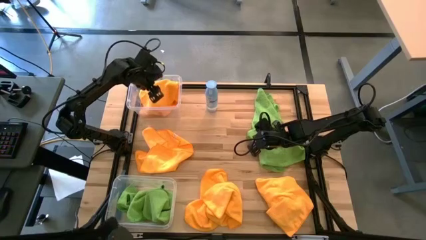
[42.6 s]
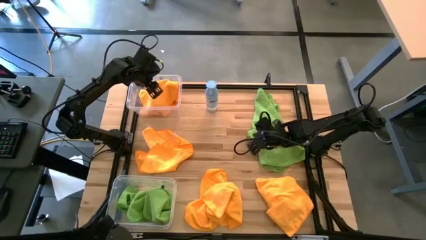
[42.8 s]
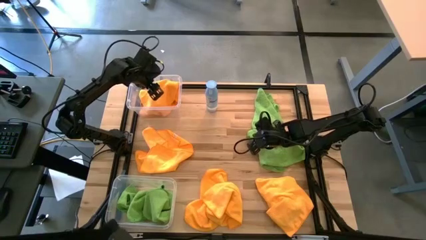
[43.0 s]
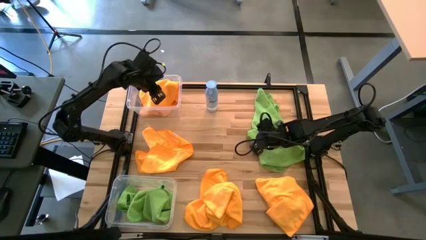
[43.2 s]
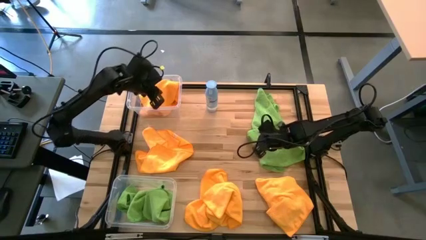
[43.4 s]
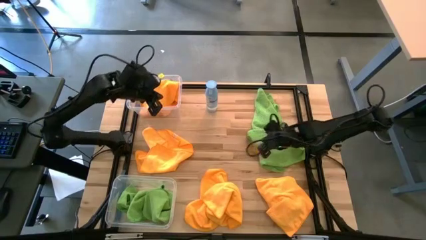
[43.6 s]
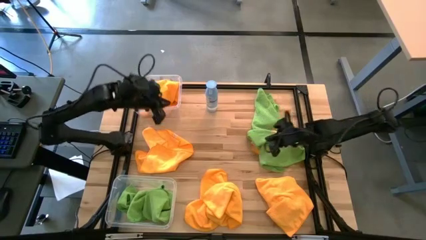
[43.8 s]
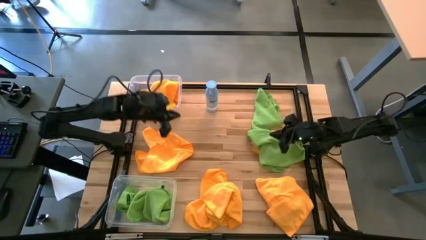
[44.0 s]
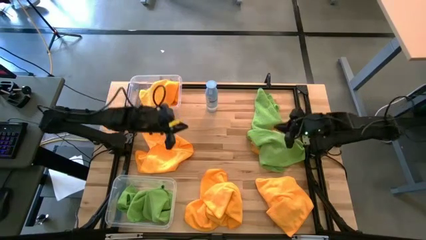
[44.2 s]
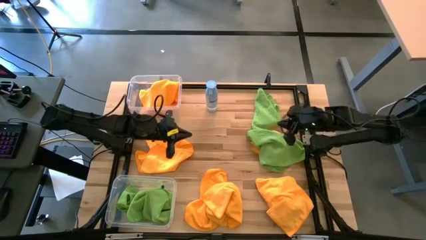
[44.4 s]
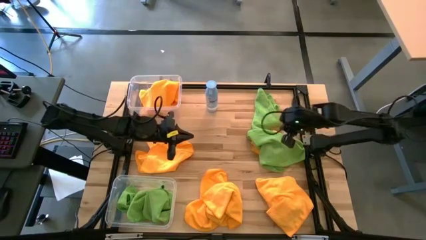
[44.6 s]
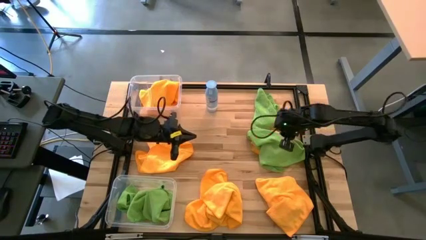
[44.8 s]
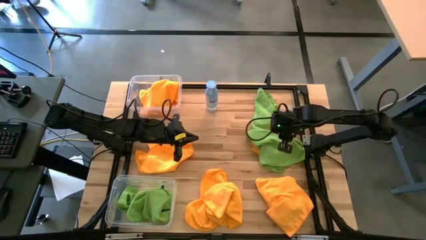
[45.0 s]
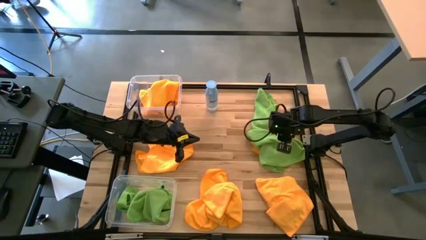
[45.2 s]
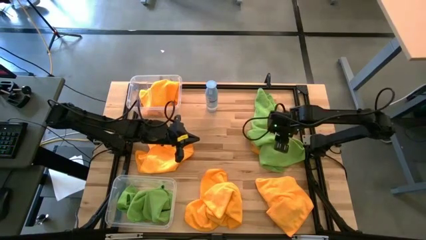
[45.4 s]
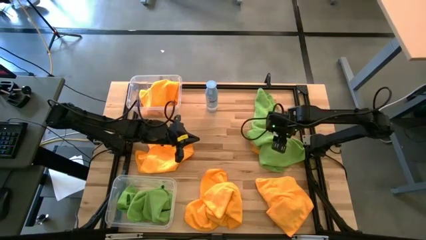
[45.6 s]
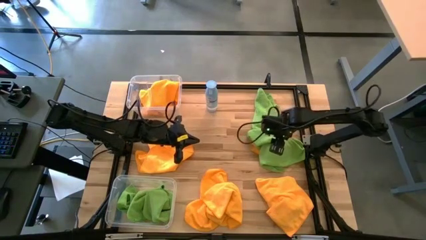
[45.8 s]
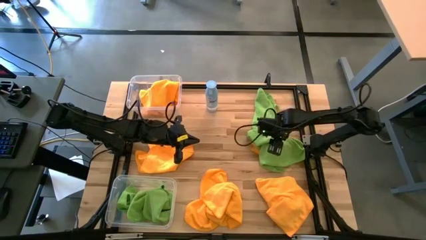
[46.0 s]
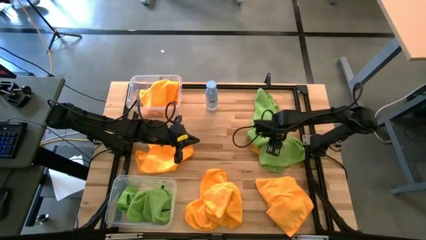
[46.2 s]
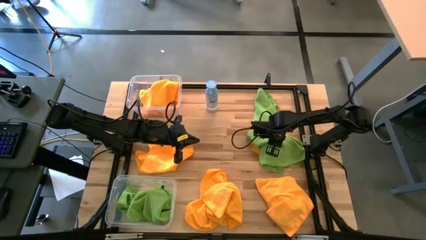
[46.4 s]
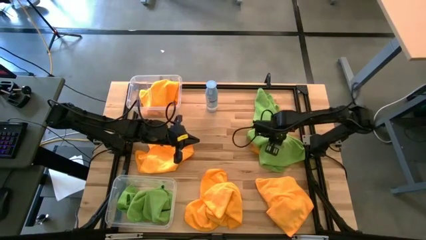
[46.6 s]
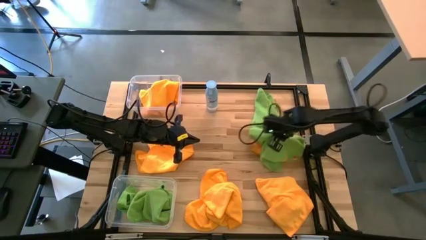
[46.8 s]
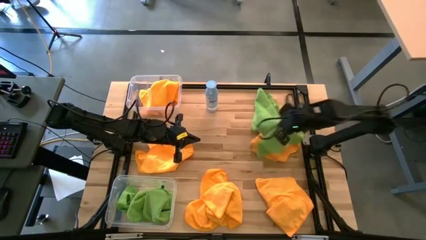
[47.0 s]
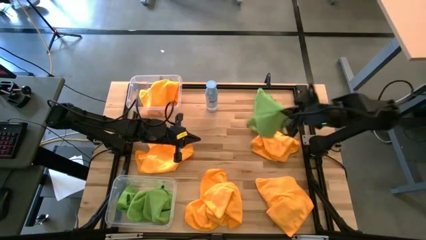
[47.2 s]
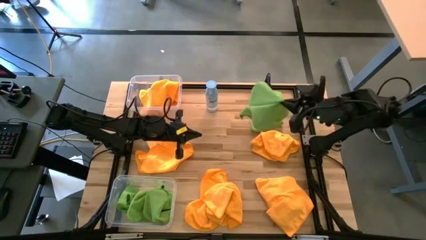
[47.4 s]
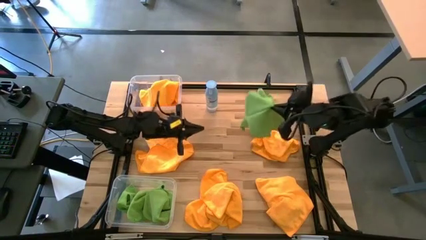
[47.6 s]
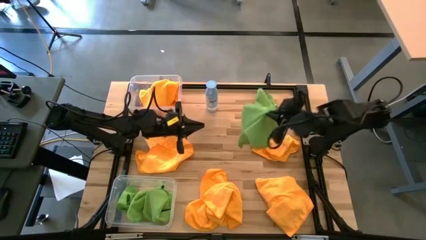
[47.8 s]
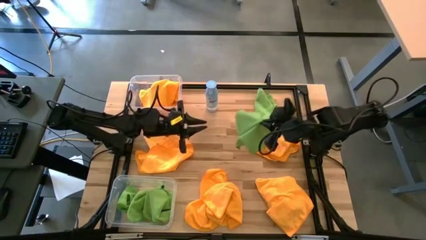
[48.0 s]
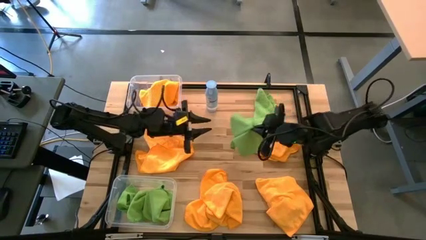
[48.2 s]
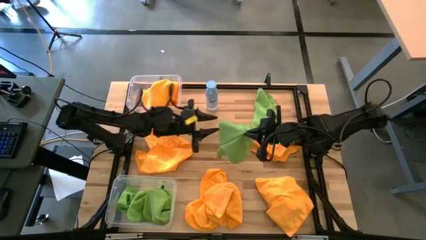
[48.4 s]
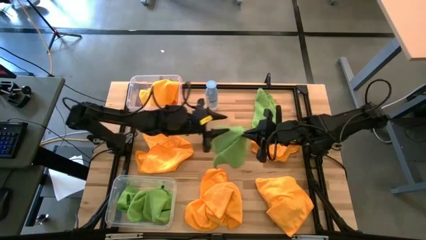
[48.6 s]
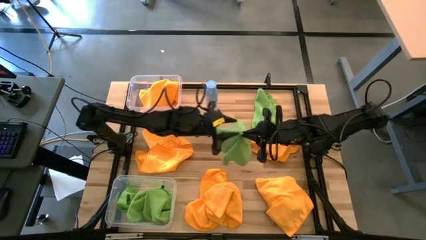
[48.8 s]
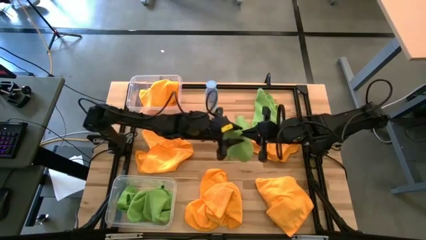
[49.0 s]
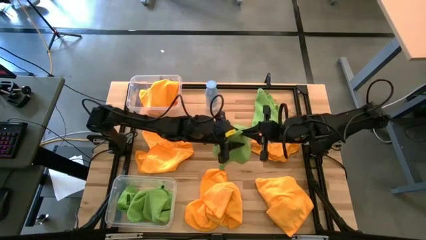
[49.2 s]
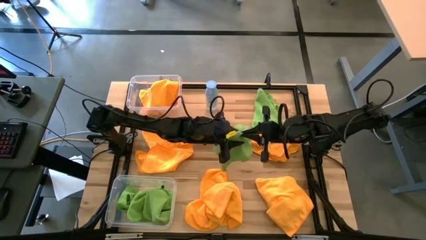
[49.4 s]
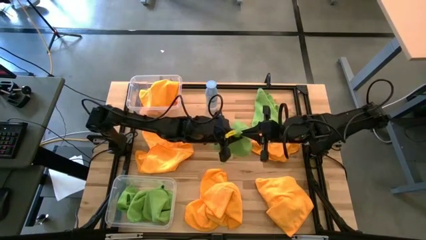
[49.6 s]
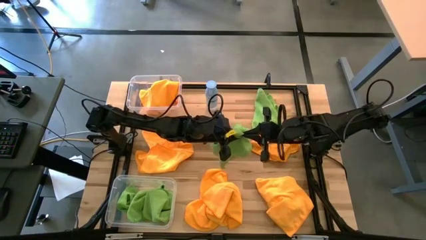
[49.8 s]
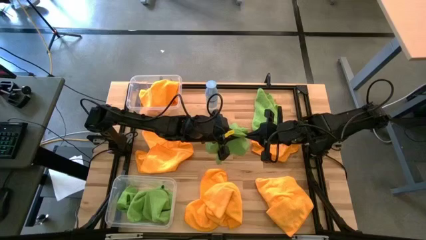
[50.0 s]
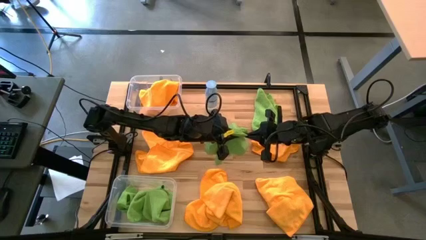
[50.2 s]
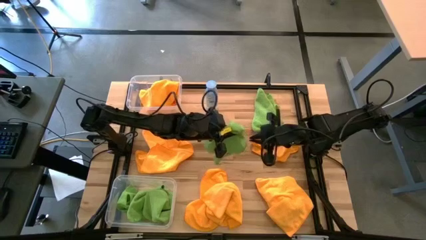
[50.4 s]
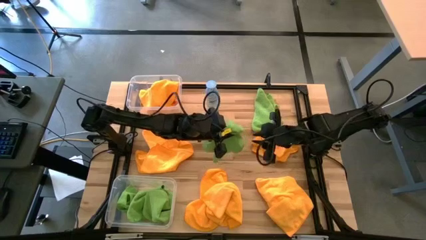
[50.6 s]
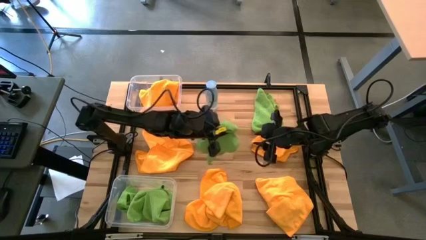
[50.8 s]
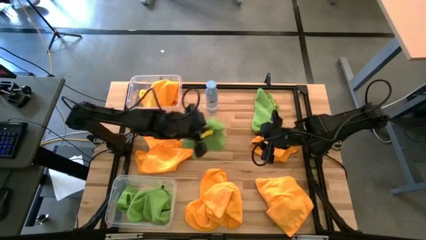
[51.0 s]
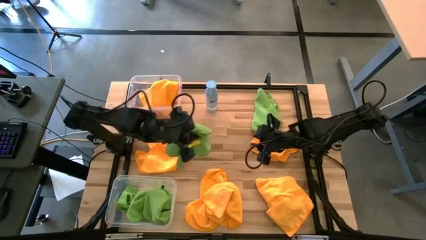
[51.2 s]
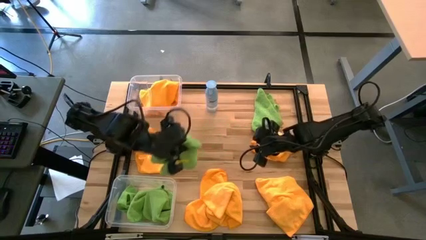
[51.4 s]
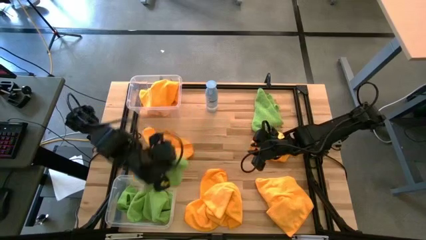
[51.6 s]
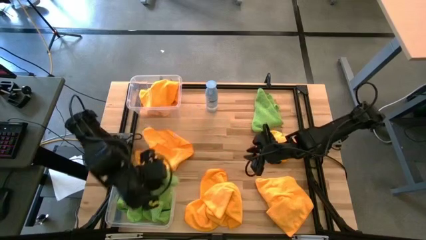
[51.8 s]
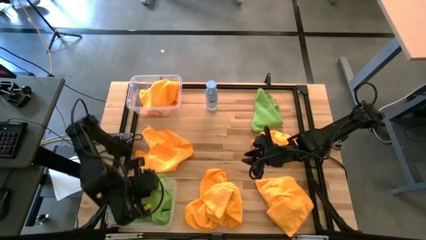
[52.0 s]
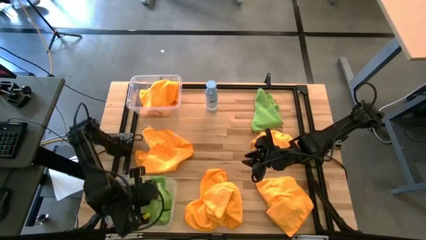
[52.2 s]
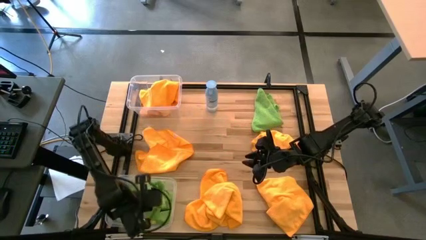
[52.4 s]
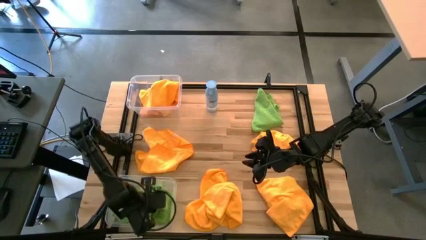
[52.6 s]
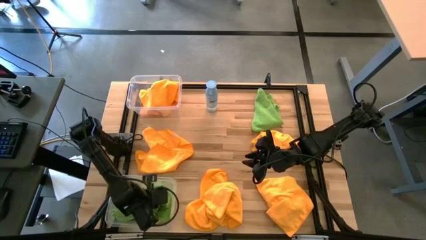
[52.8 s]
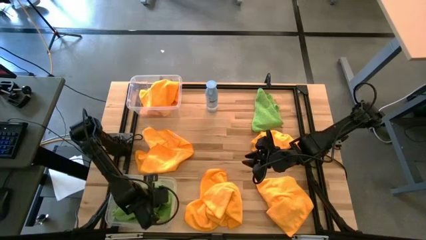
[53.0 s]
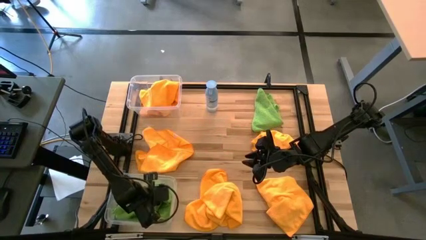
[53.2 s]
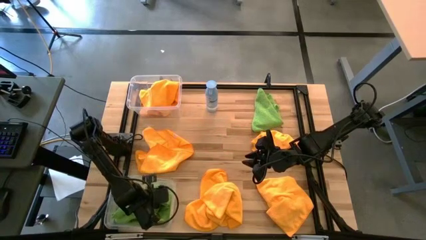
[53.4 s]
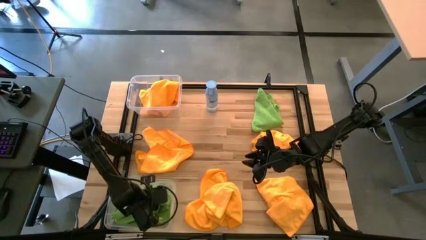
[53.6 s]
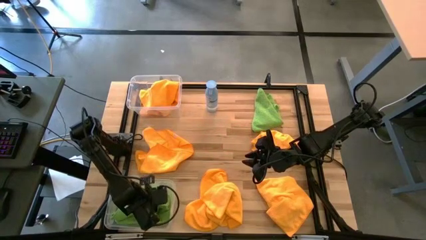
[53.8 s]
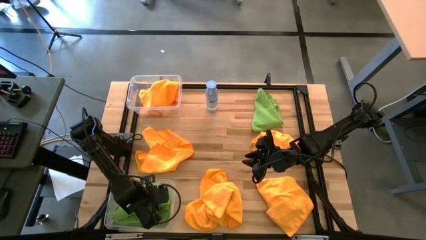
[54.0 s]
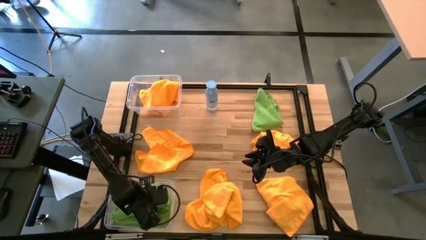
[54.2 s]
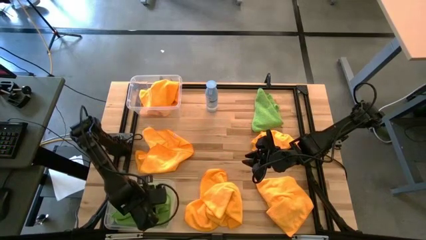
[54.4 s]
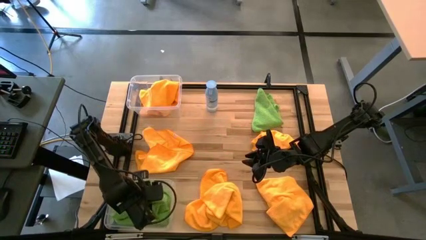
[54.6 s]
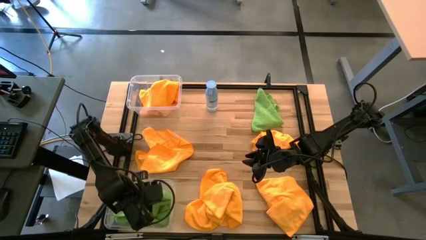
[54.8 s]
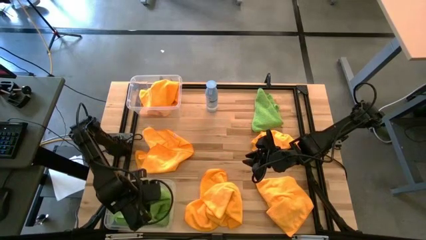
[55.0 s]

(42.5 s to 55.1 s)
Task: Sort microfiber towel by color & place in baskets
Put the green microfiber towel into the bottom transparent bin

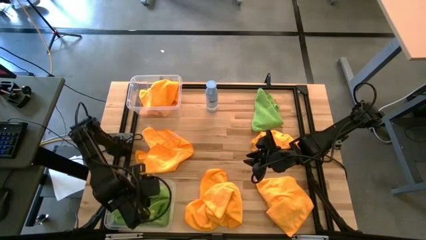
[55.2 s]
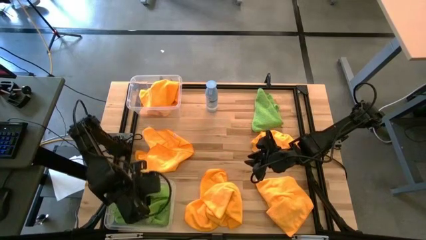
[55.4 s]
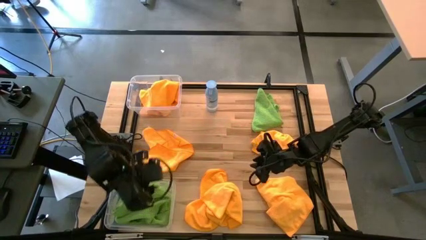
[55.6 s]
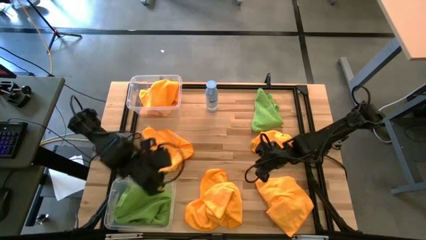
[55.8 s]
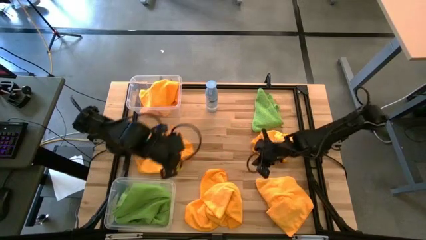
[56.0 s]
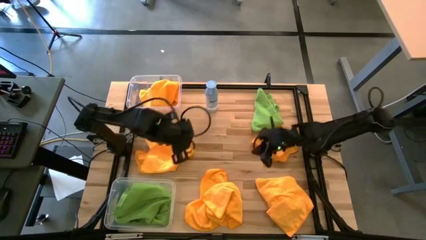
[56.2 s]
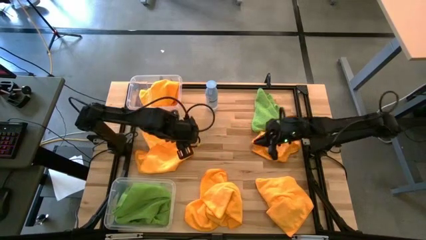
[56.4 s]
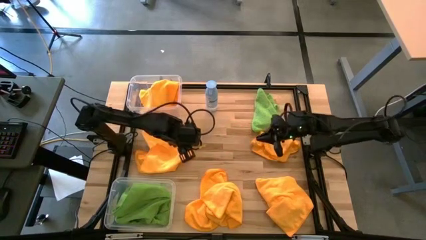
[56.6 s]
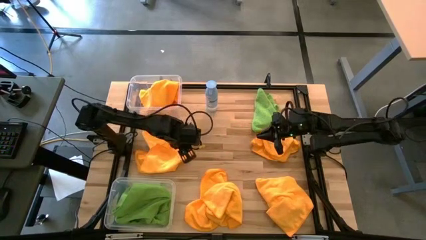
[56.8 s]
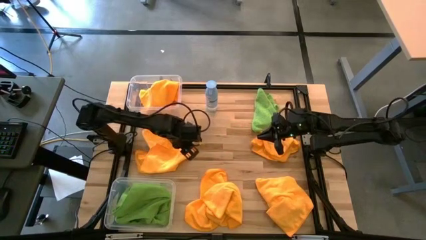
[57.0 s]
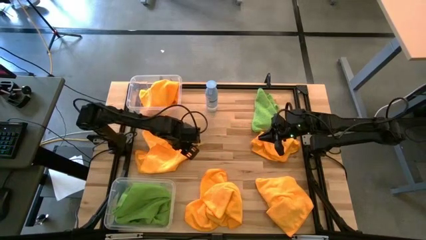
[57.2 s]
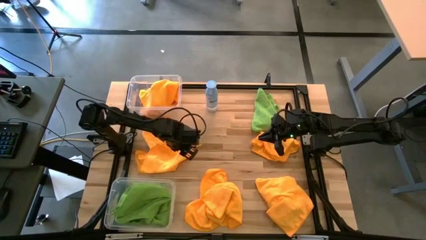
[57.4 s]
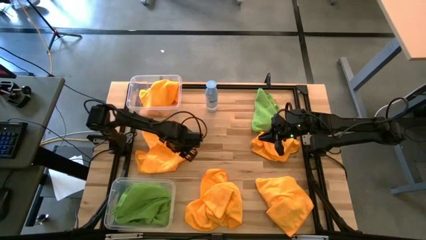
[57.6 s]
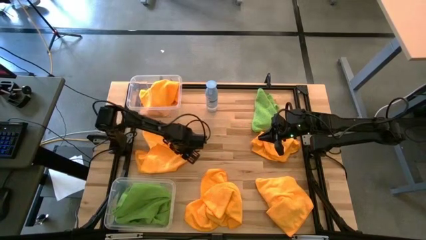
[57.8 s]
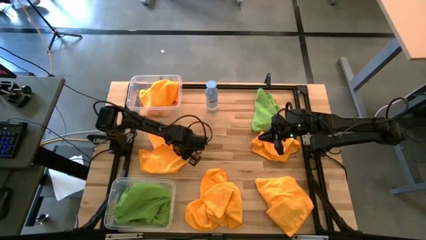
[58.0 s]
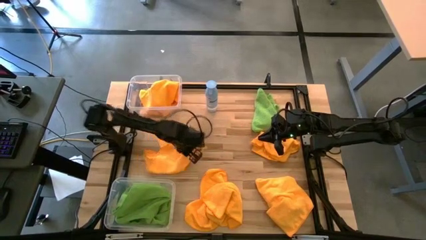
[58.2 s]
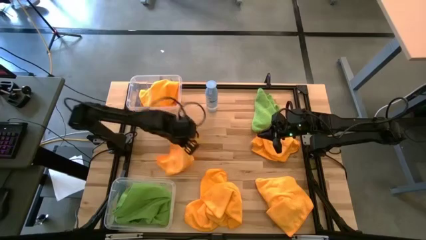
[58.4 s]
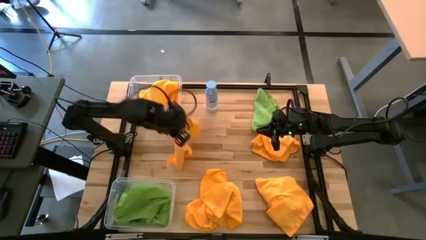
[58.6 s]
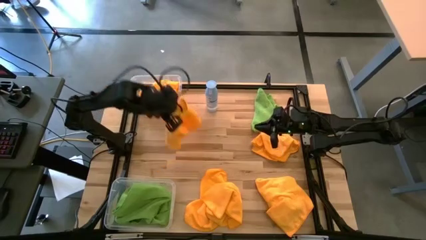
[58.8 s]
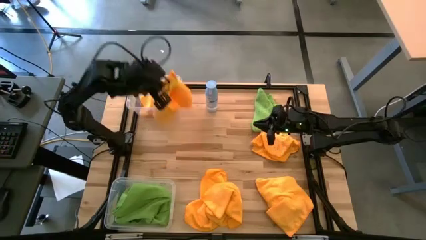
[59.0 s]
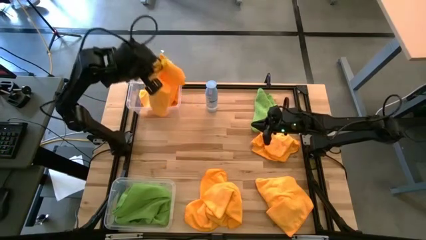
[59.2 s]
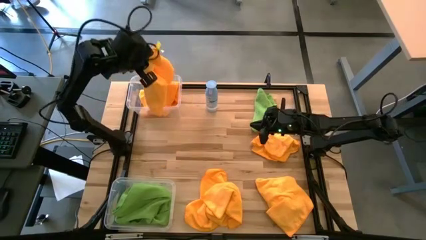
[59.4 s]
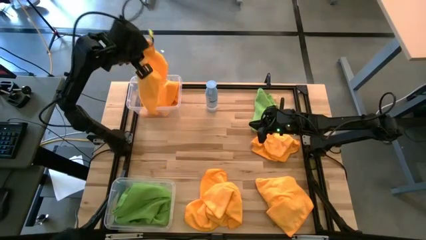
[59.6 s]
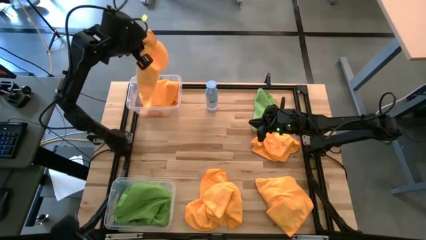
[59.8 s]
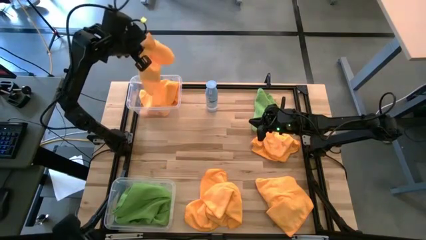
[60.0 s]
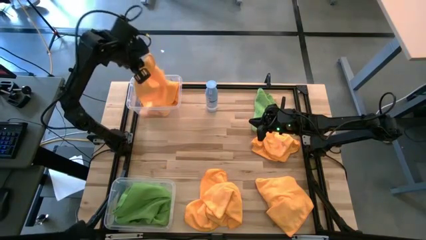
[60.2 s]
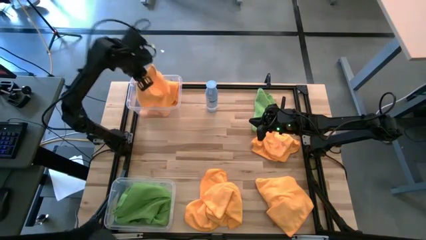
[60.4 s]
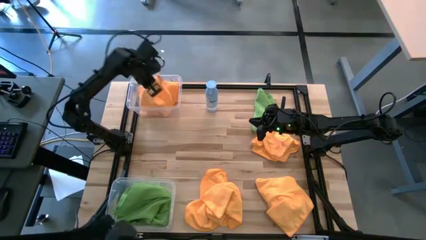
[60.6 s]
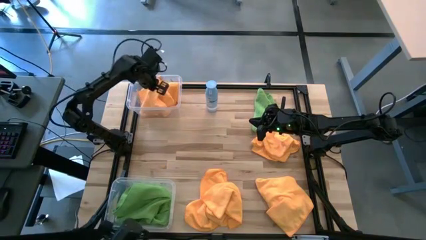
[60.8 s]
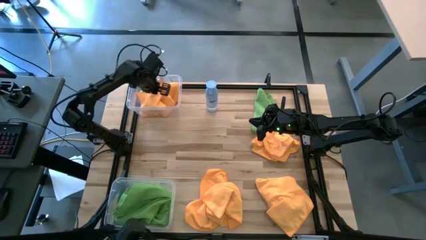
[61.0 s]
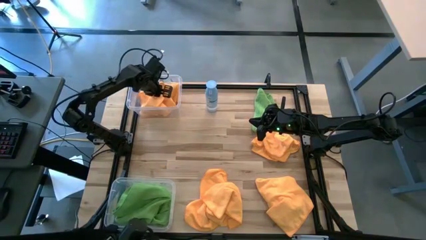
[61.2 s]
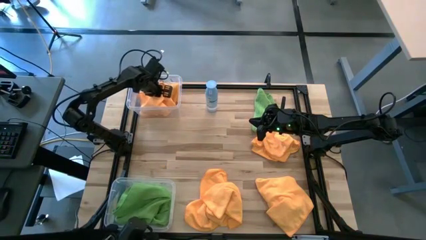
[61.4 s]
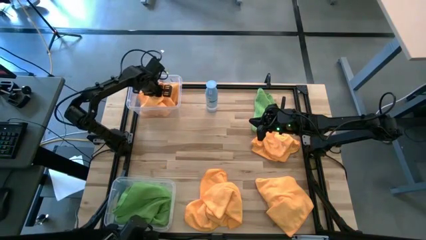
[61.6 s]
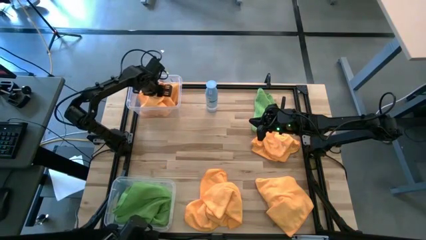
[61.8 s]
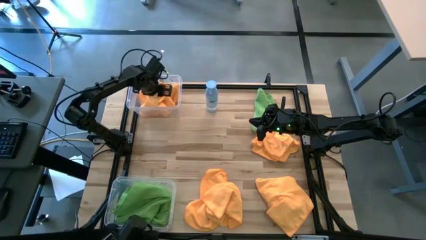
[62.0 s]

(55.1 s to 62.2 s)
Put the yellow microfiber towel into the top transparent bin
